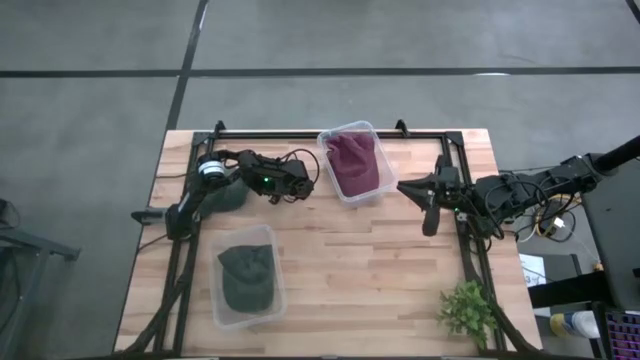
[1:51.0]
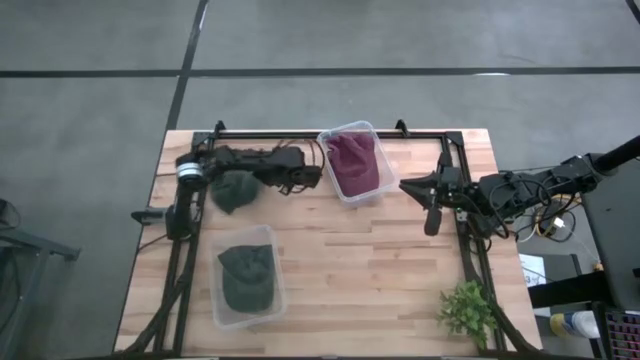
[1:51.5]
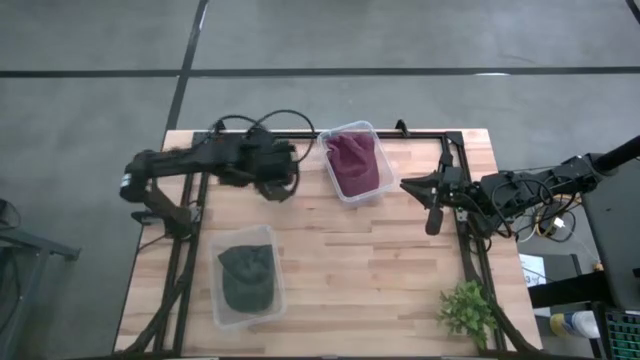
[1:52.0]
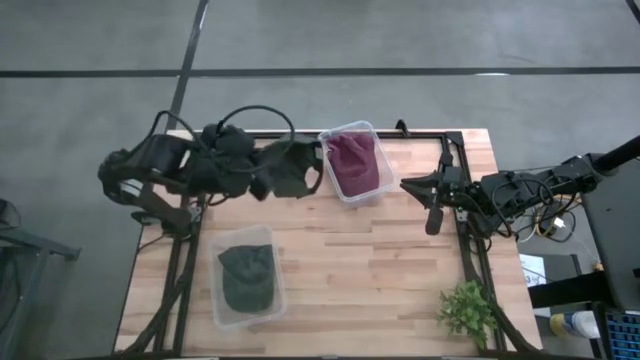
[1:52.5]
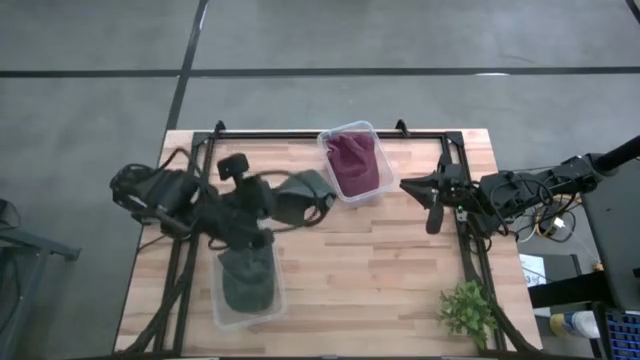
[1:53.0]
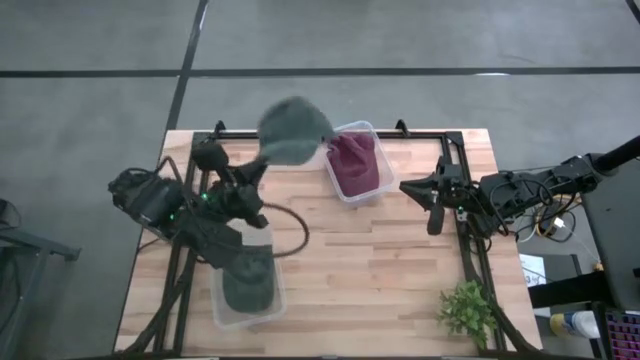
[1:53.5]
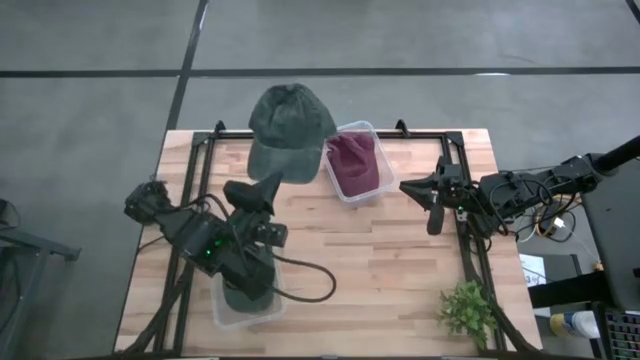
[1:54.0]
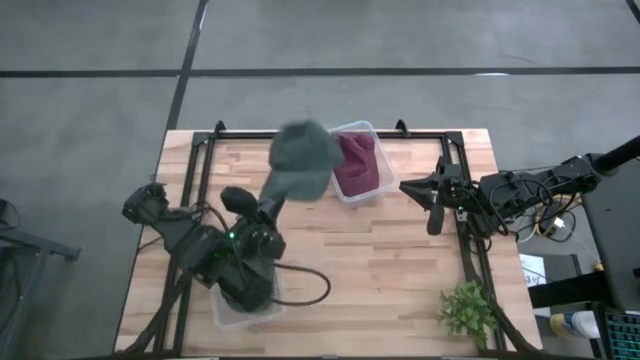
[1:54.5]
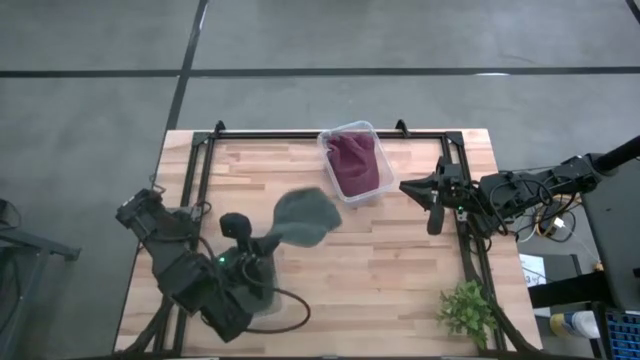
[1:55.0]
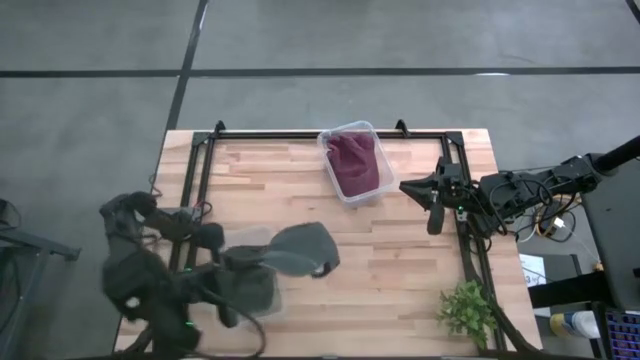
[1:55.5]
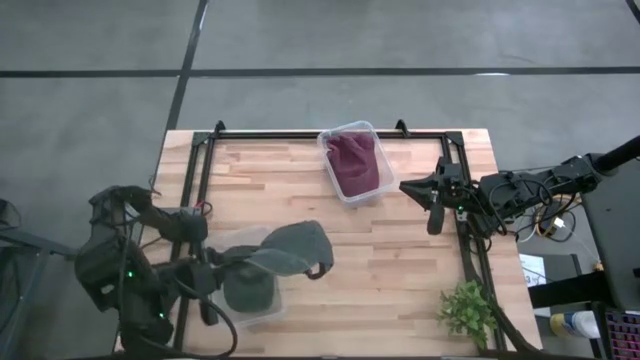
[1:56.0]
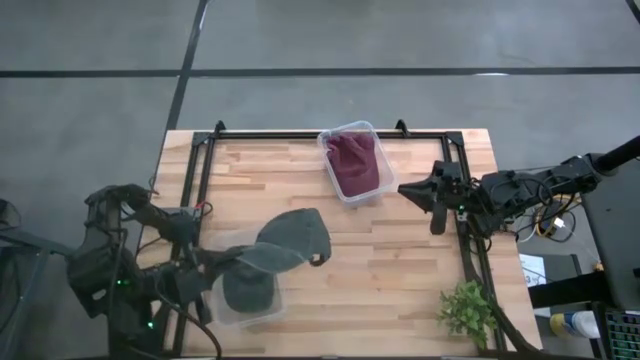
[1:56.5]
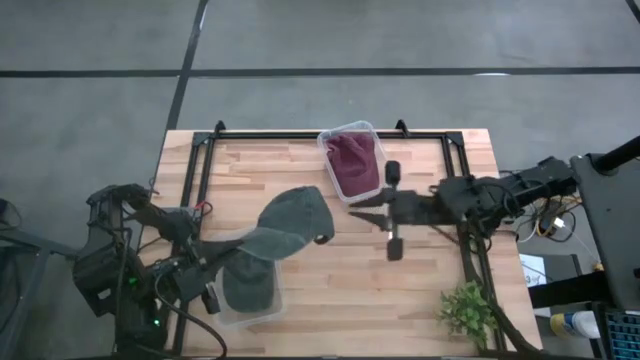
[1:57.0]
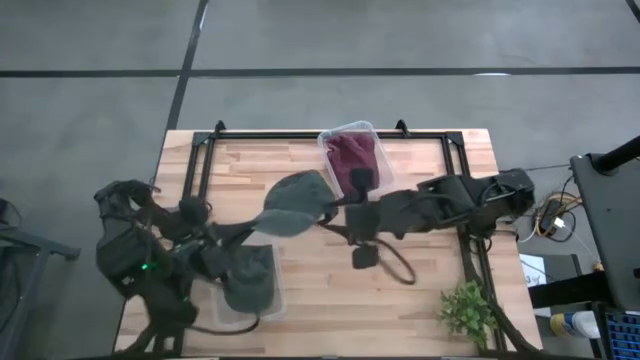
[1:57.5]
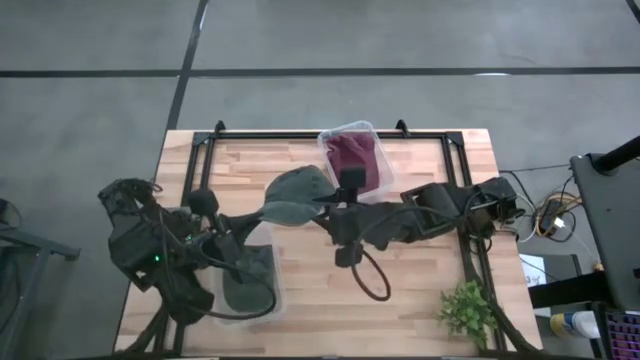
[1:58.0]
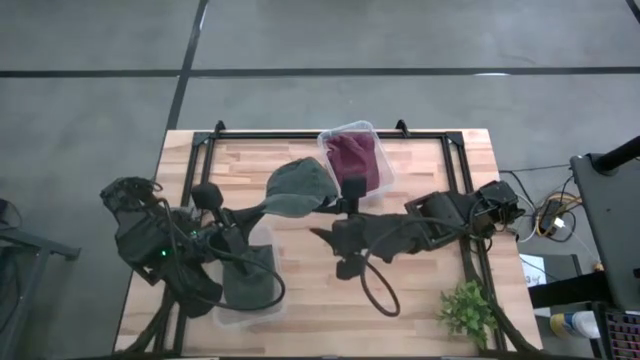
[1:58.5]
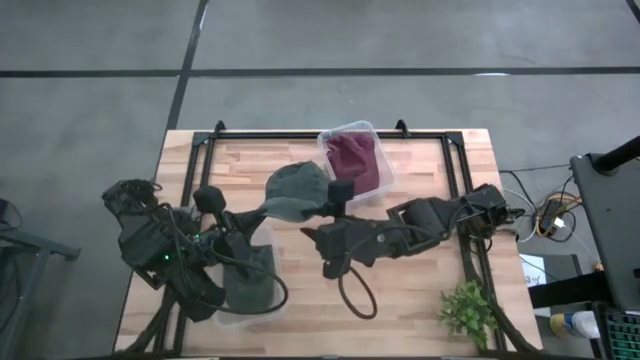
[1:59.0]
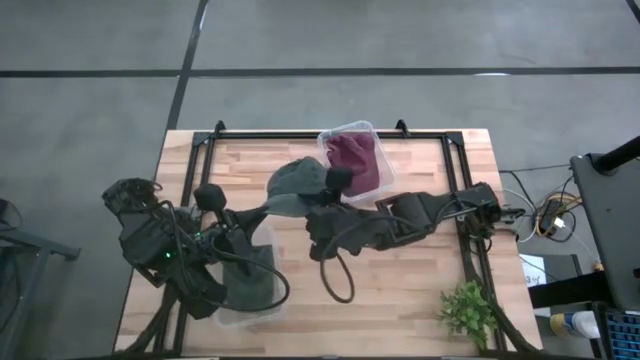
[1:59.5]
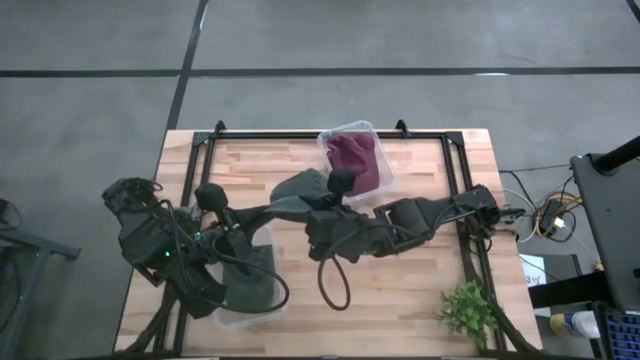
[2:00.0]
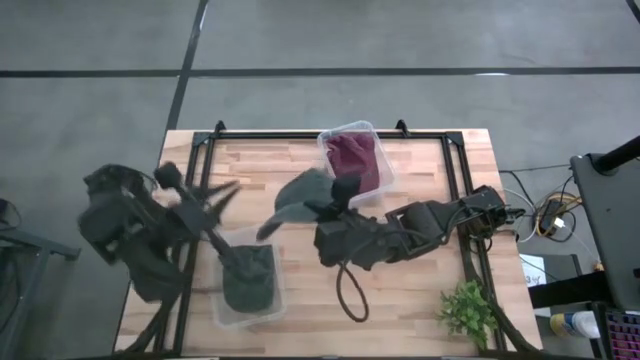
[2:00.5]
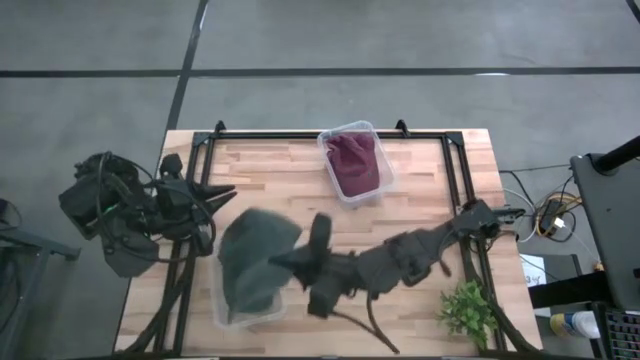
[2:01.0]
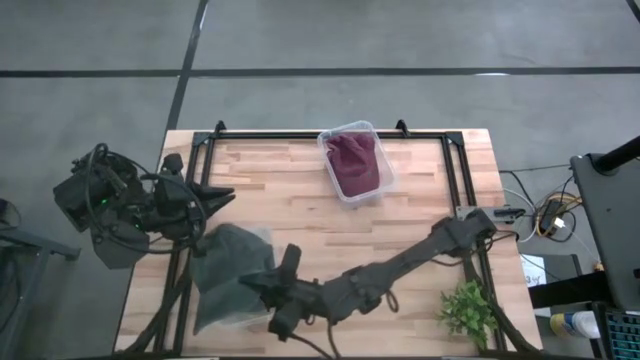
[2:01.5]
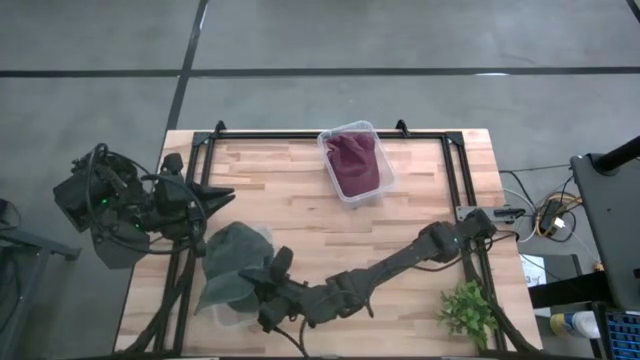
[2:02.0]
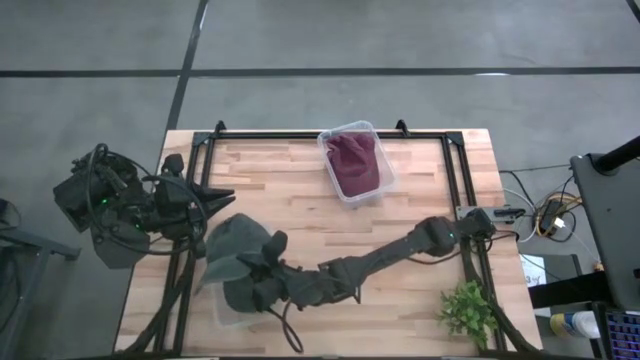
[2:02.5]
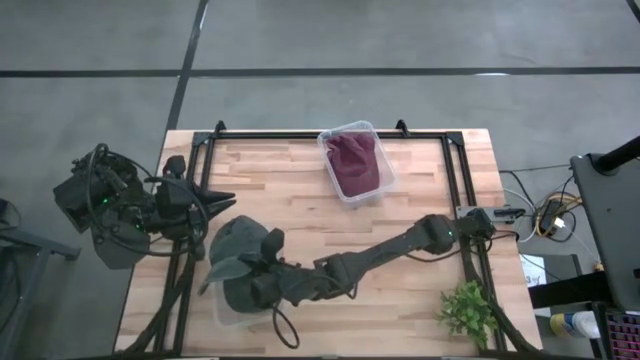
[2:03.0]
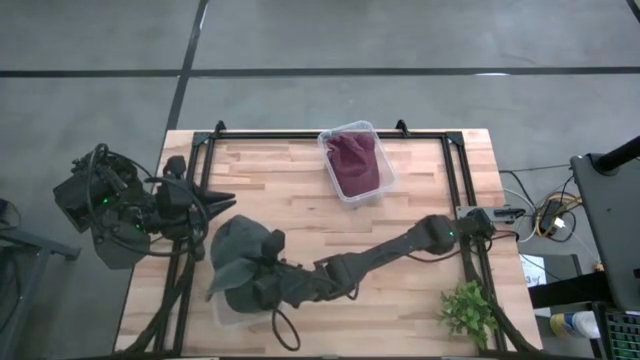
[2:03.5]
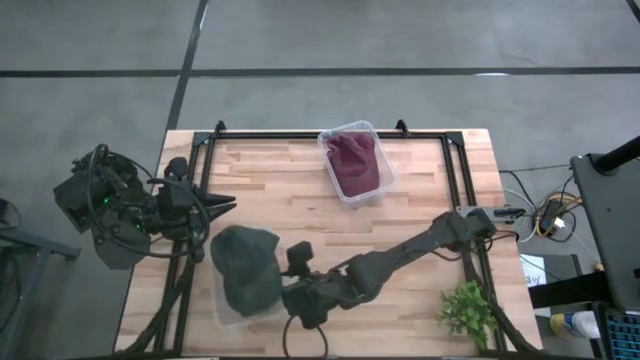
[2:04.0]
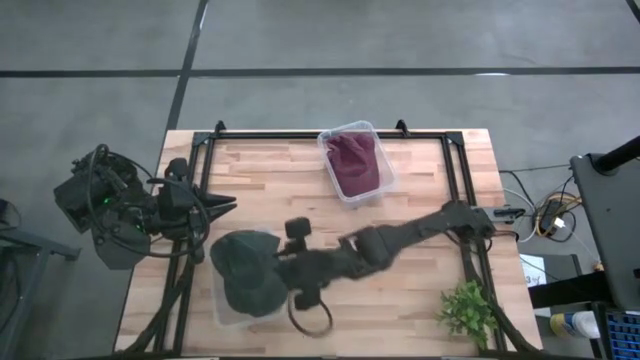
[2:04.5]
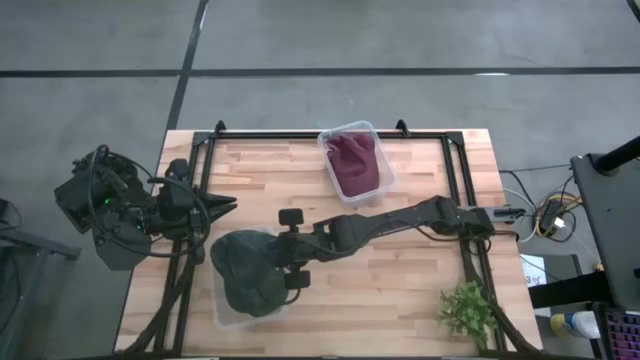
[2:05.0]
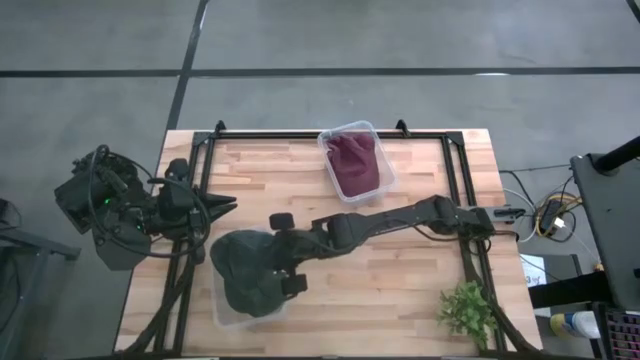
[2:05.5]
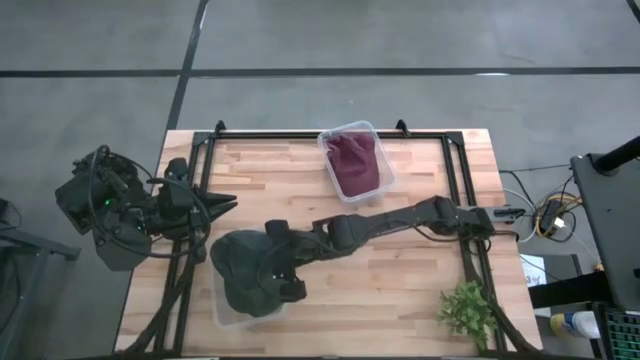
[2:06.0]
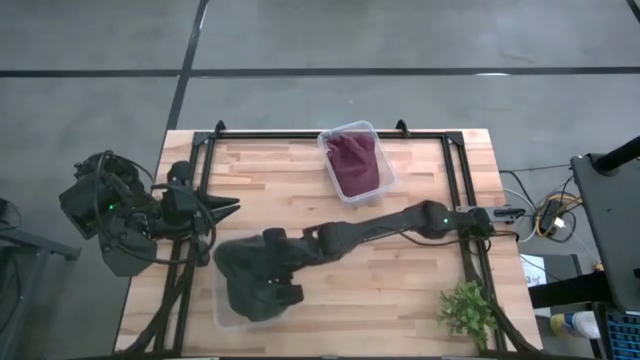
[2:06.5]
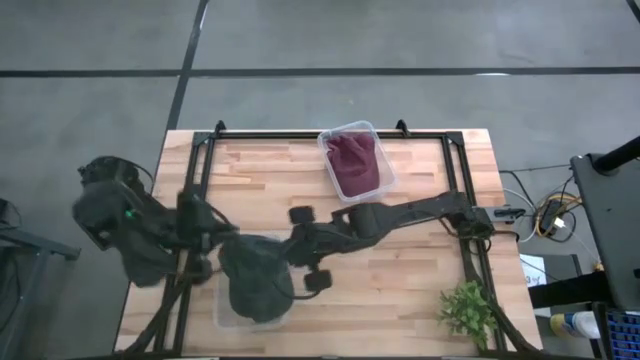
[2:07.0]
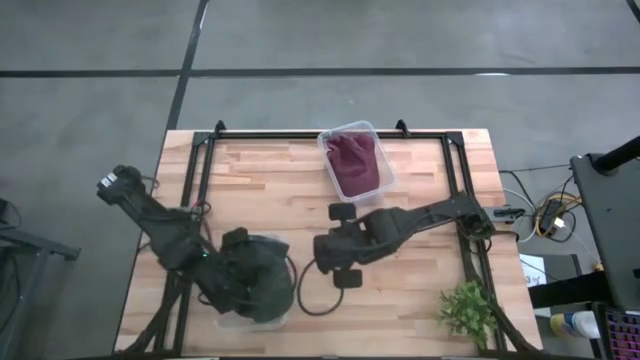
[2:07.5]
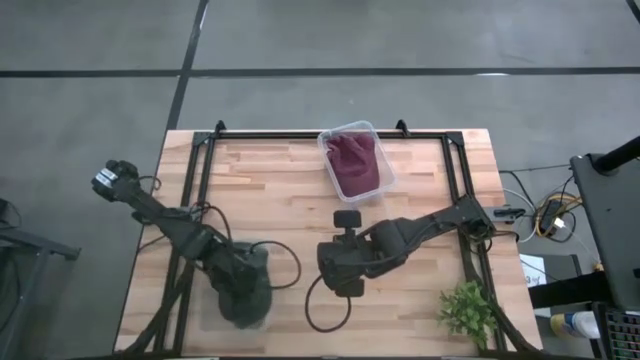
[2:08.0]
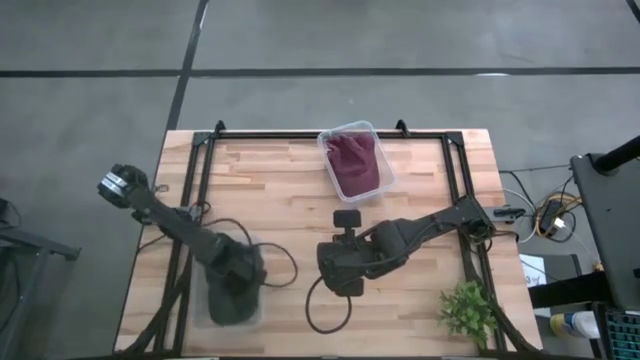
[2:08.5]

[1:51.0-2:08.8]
Task: Pick & Place hat
Put the green cap into the bottom transparent bin
